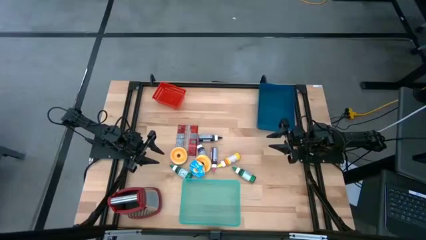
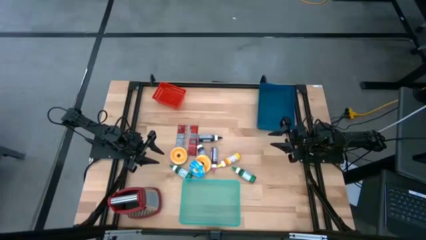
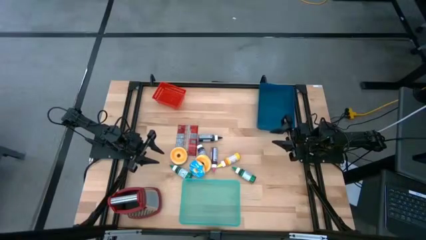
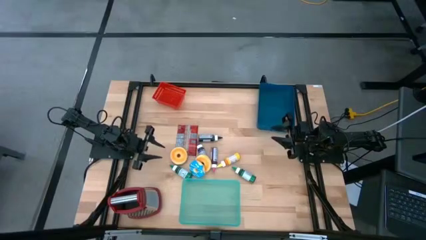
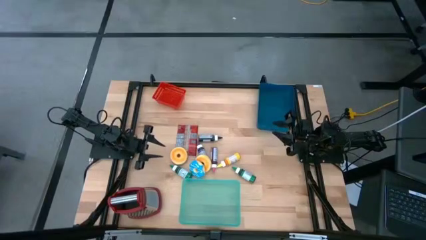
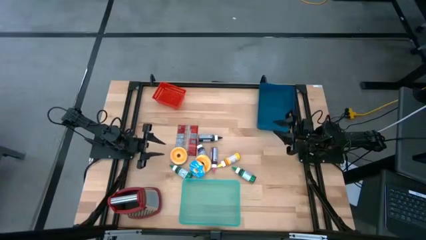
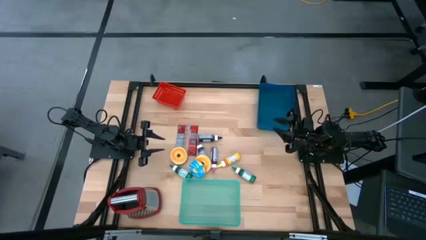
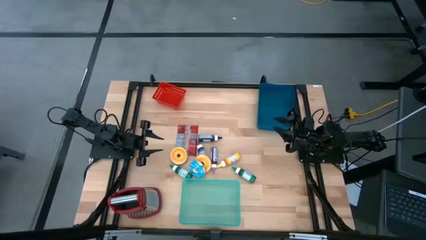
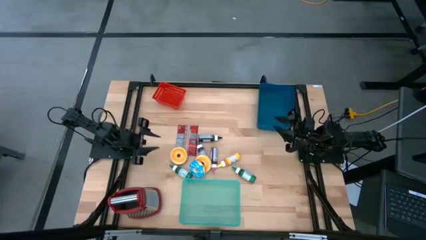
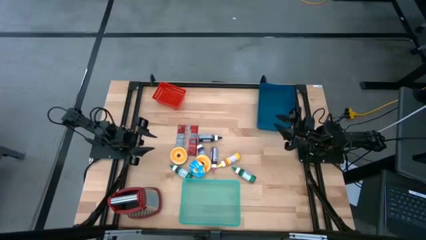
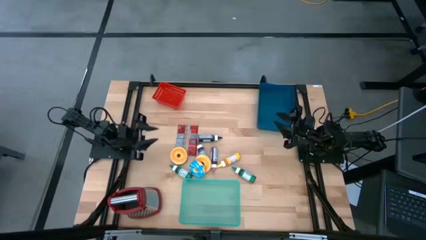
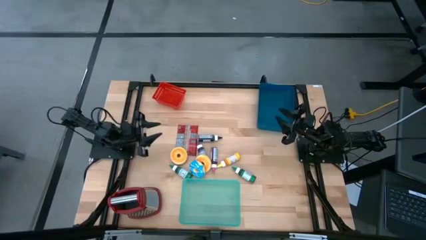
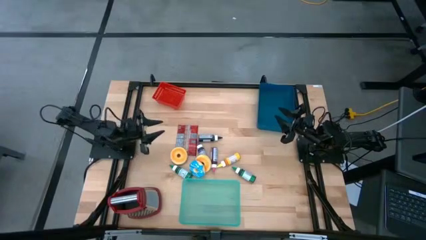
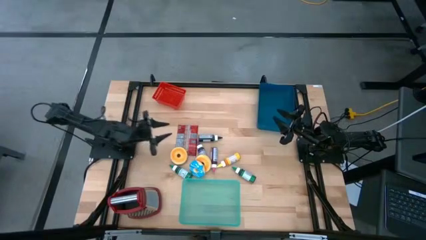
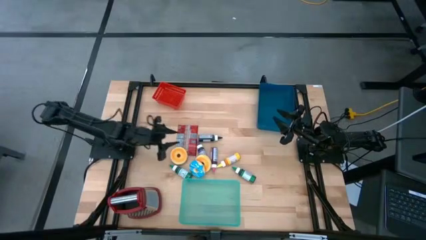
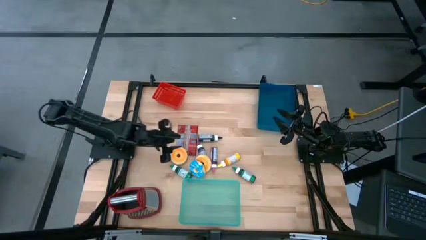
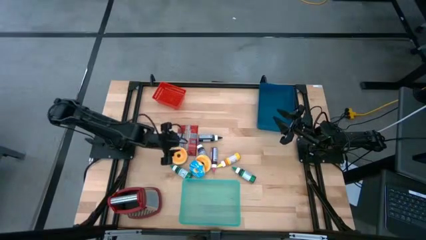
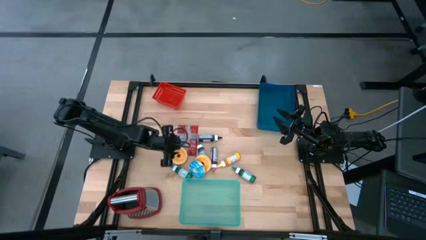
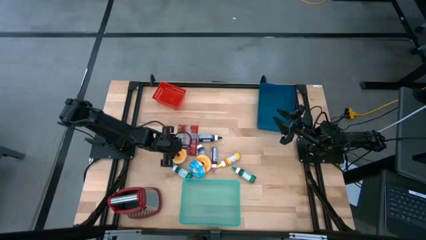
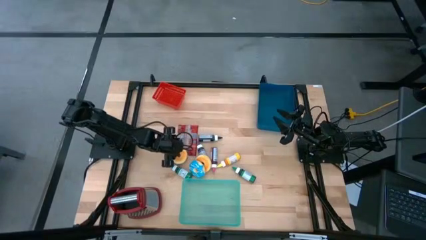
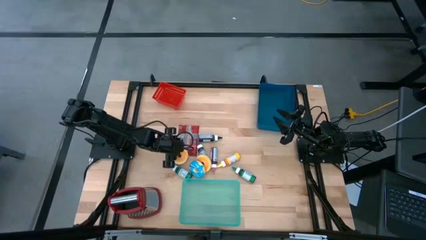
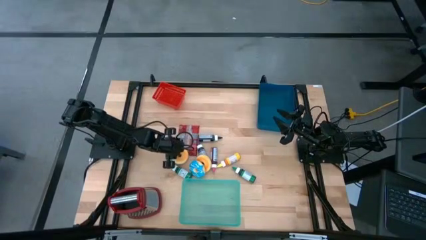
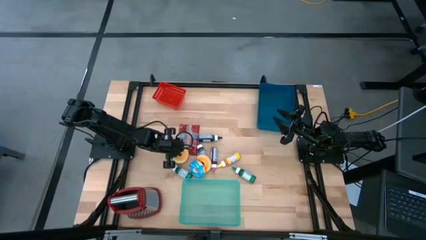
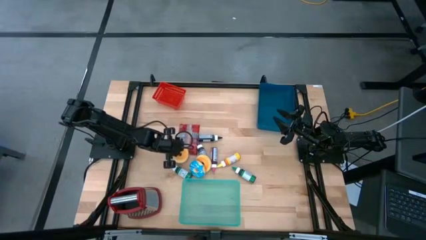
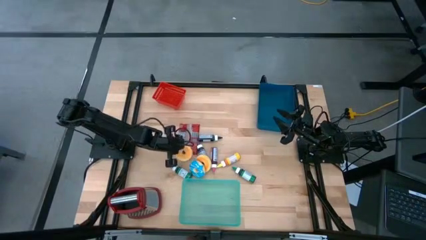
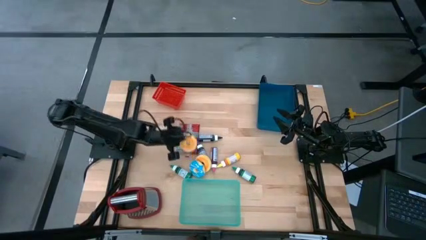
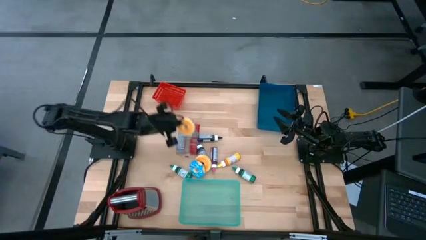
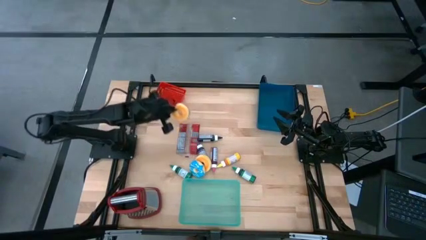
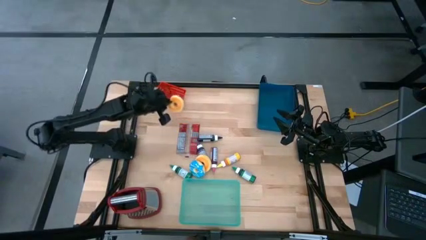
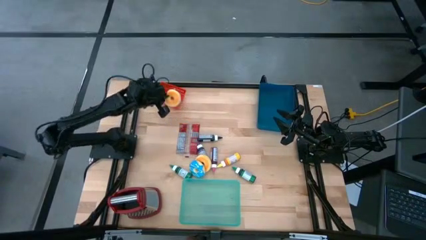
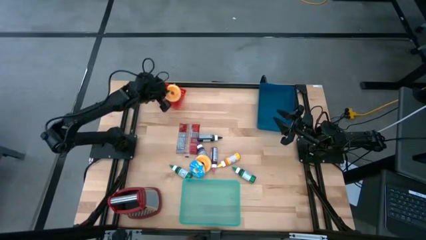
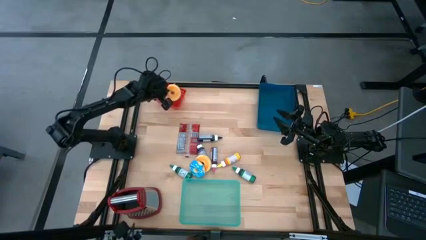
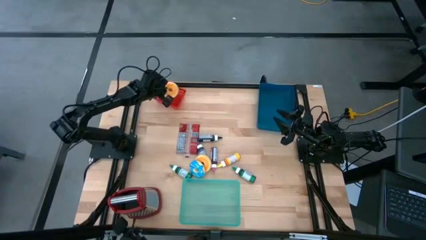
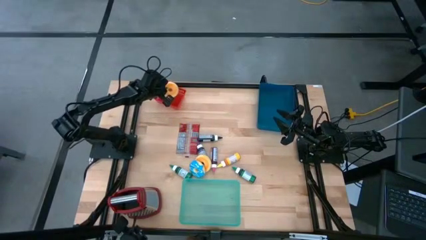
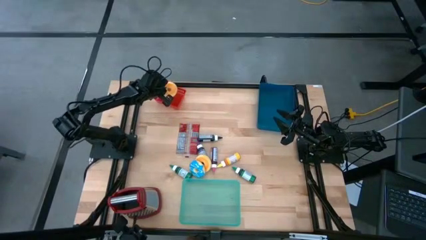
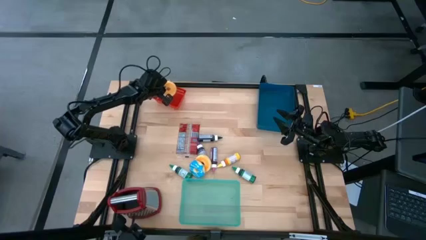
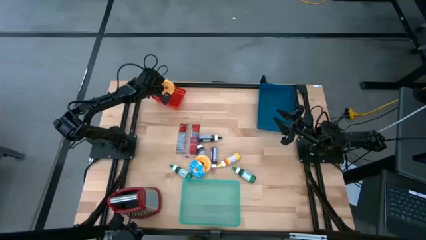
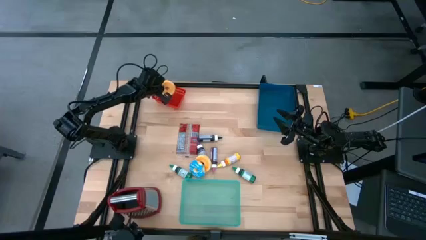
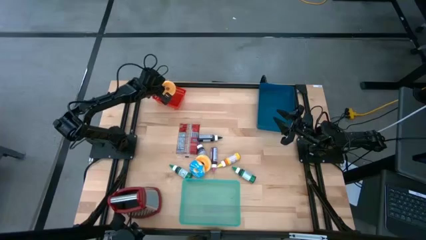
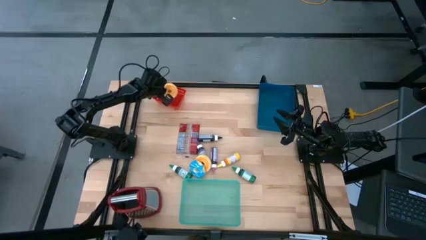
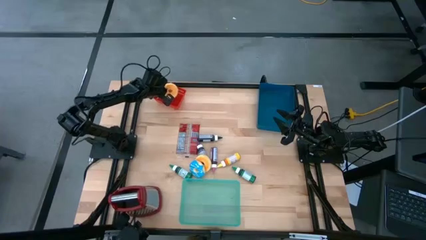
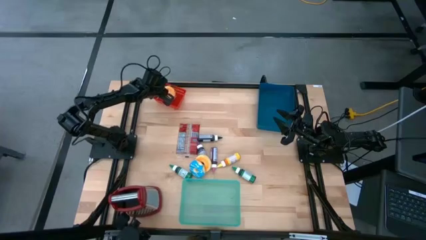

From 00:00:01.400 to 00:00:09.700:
Put the black donut into the red bin

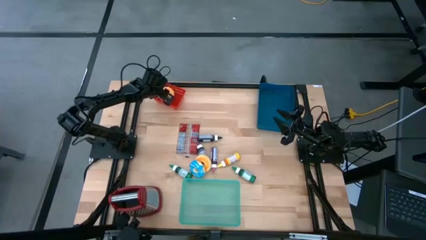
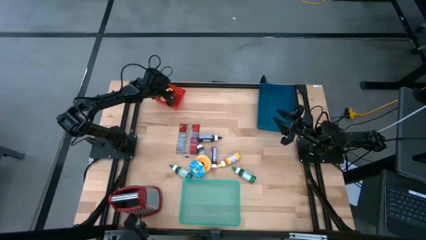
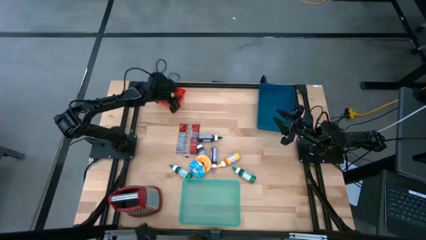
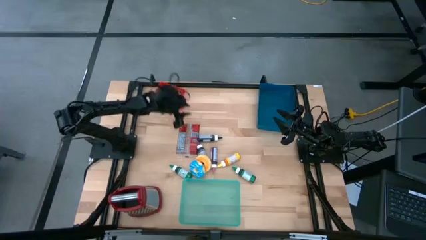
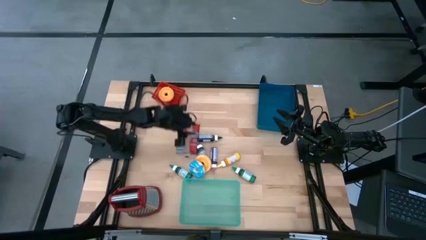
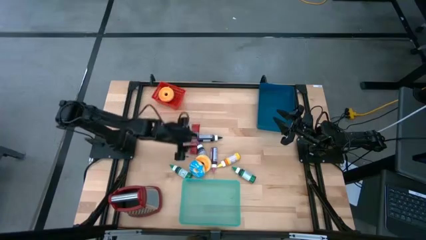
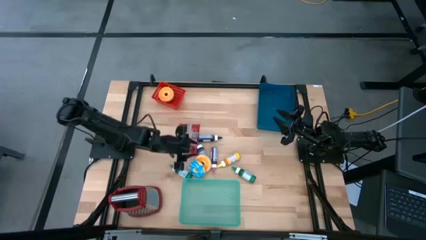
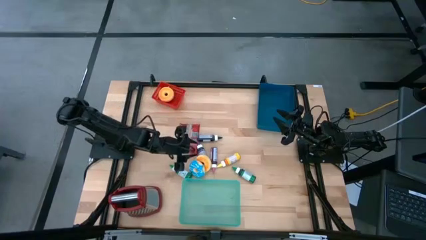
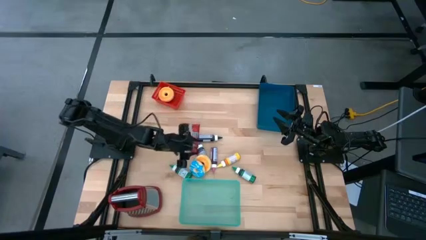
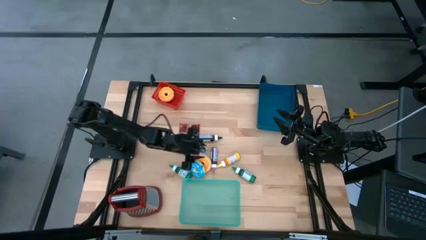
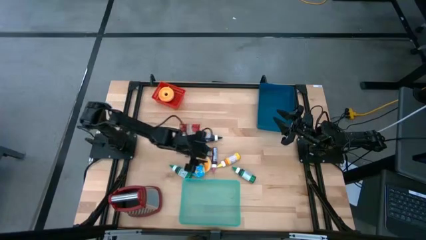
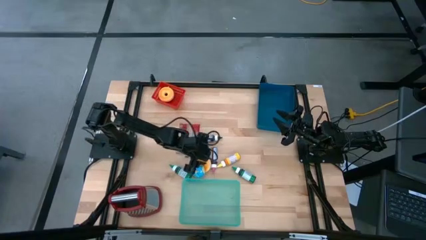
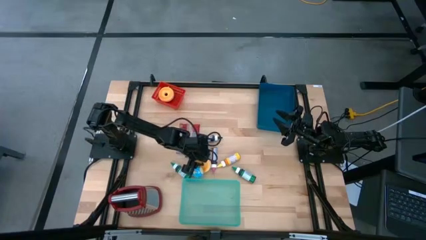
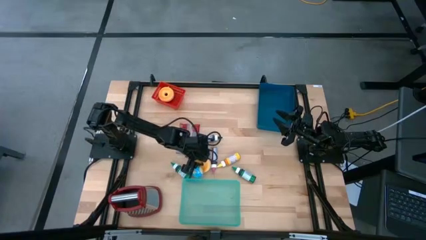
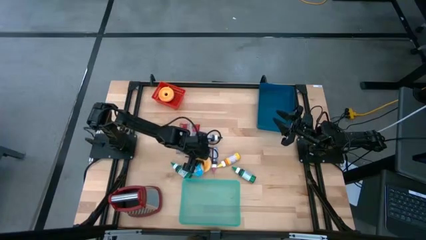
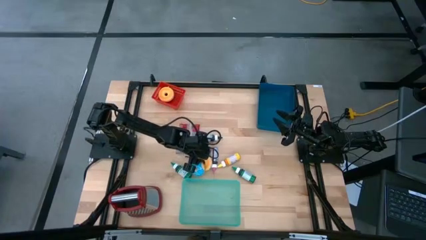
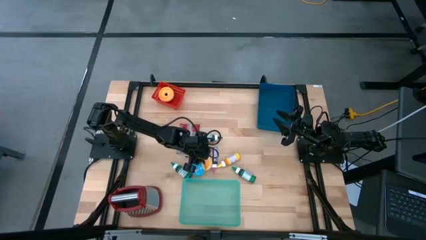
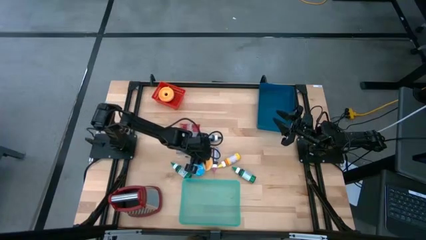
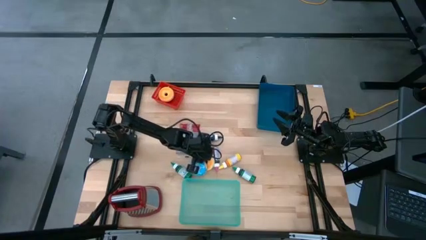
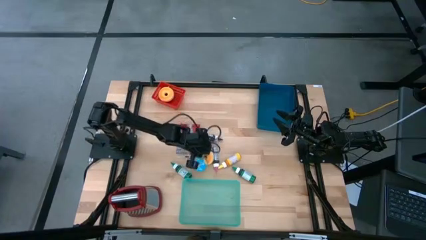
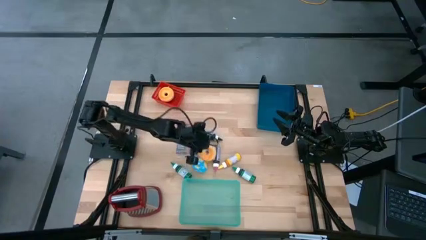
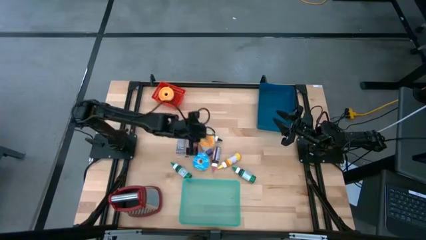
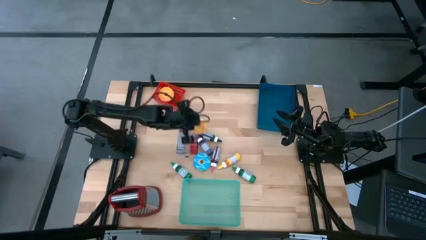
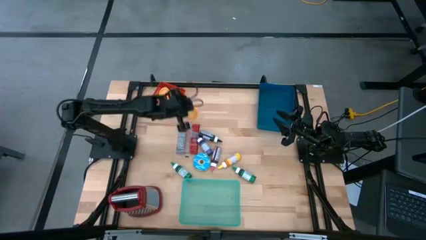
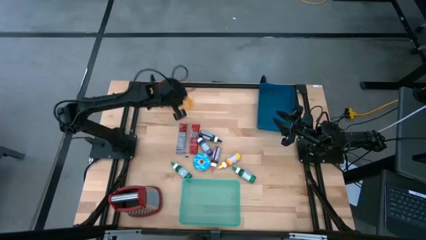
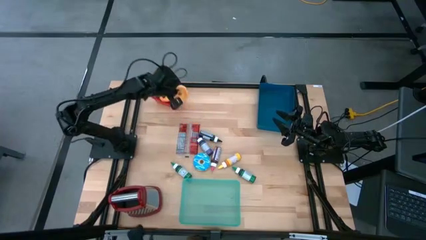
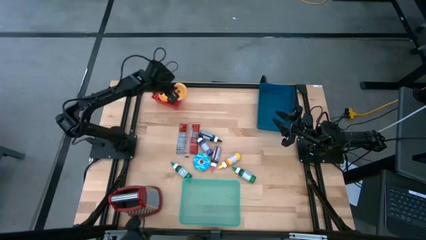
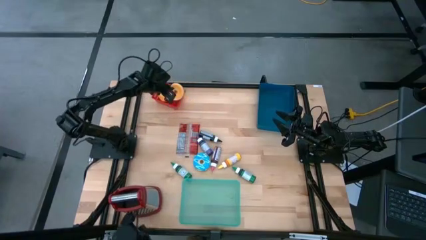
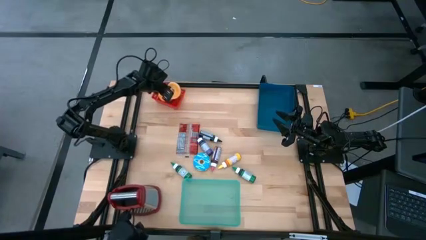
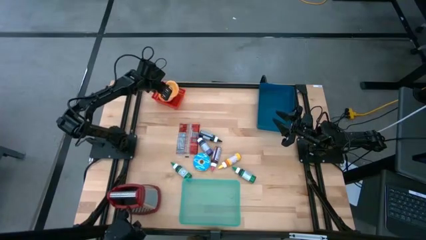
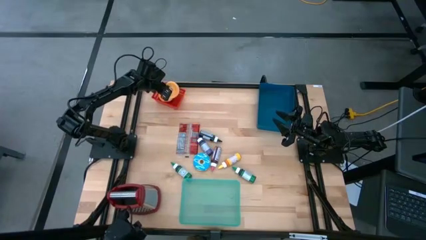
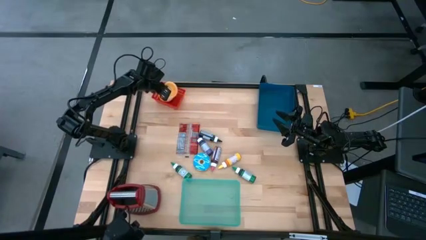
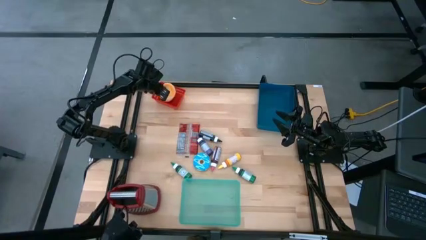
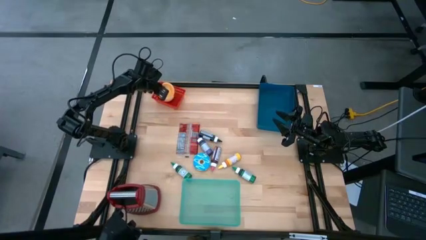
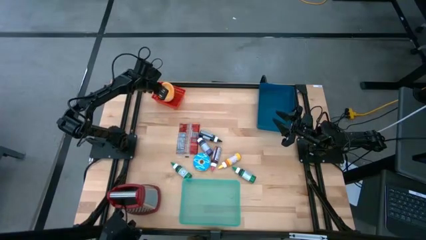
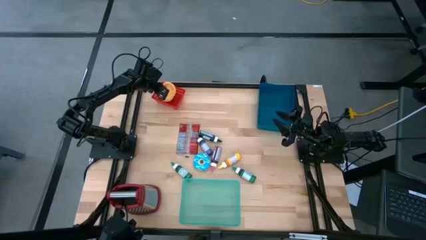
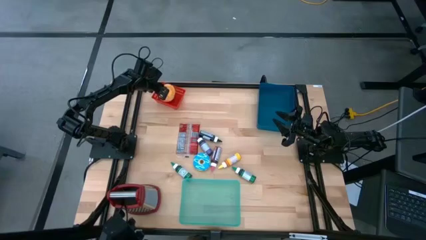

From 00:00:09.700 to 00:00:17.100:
Put the pink donut into the red bin
